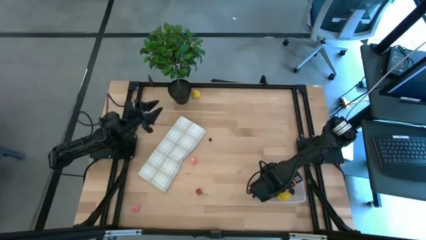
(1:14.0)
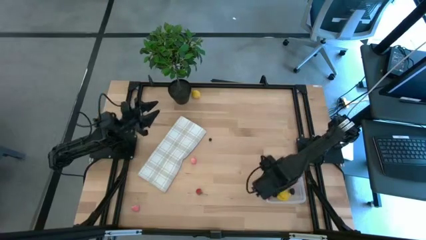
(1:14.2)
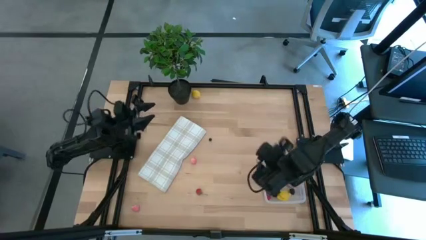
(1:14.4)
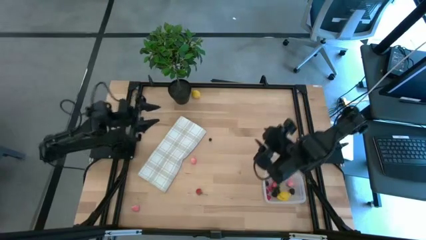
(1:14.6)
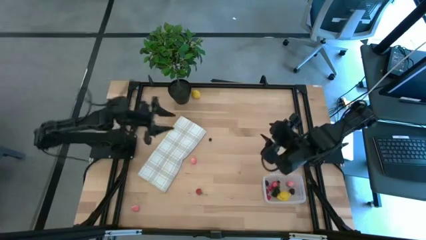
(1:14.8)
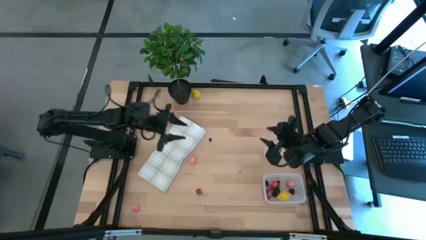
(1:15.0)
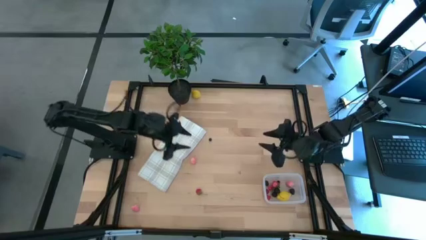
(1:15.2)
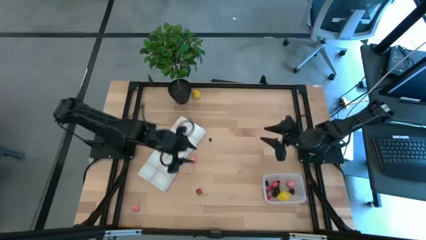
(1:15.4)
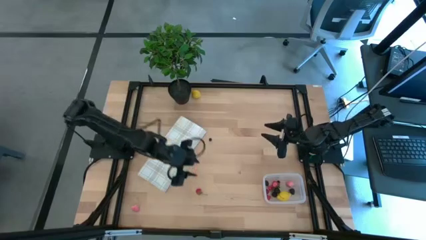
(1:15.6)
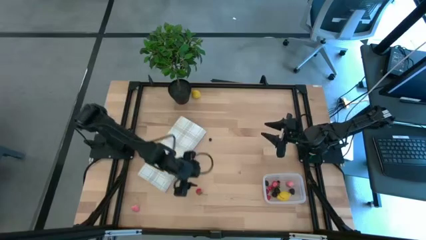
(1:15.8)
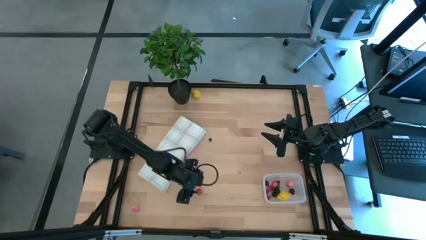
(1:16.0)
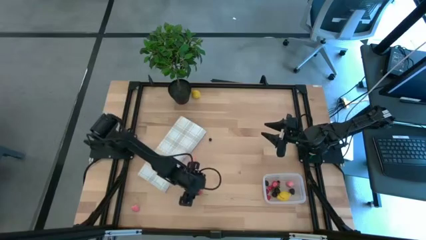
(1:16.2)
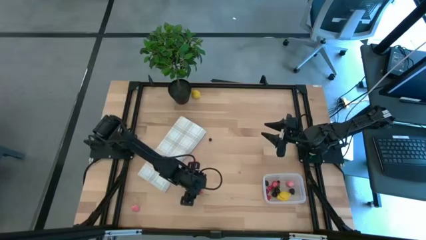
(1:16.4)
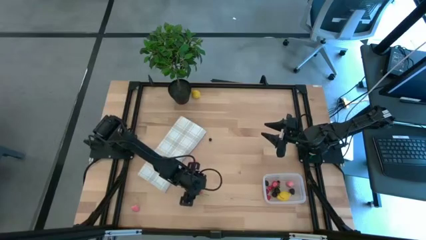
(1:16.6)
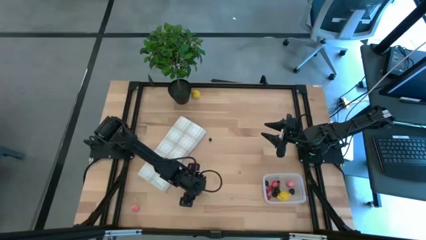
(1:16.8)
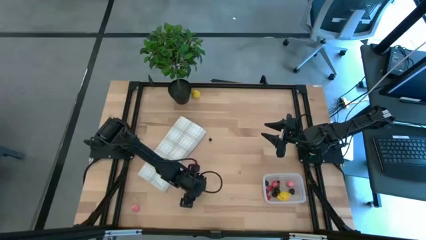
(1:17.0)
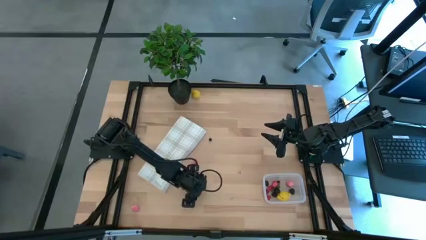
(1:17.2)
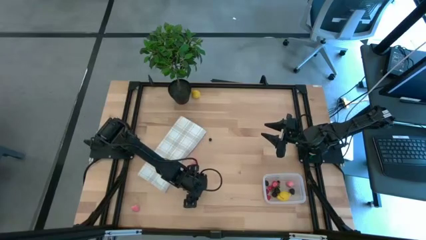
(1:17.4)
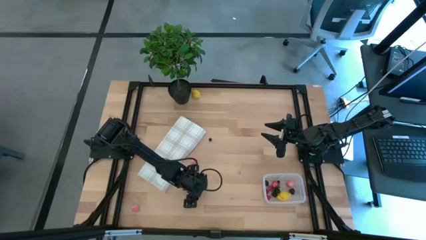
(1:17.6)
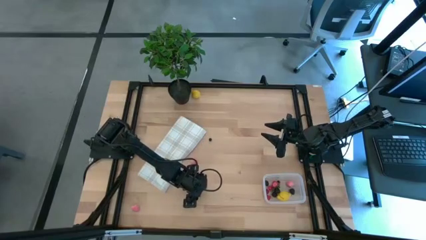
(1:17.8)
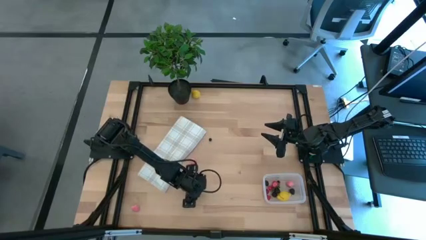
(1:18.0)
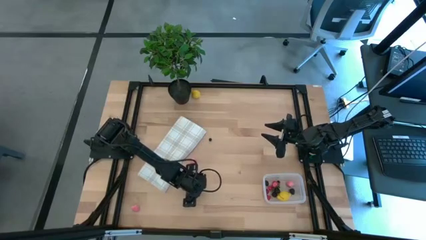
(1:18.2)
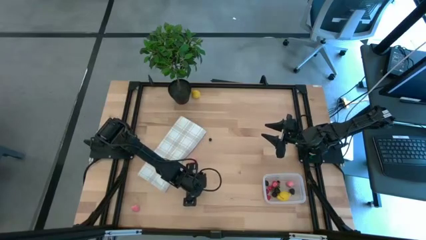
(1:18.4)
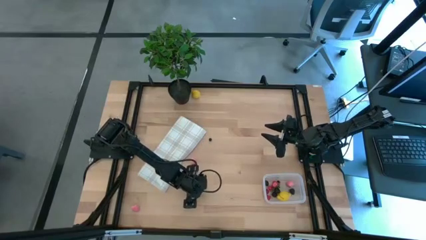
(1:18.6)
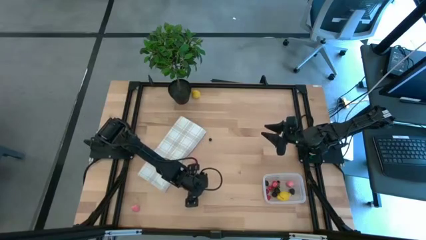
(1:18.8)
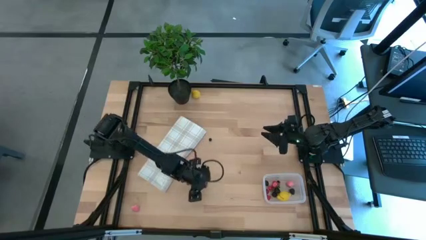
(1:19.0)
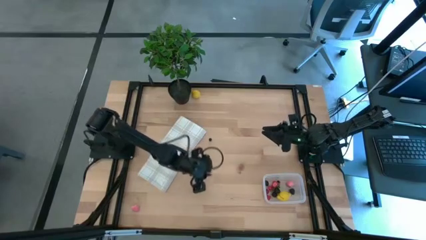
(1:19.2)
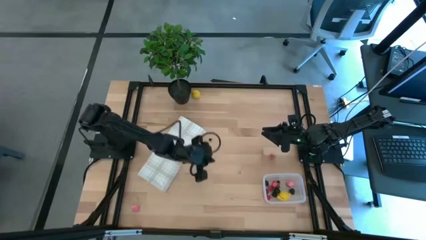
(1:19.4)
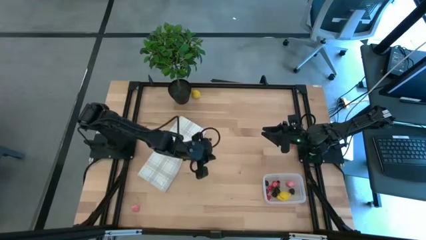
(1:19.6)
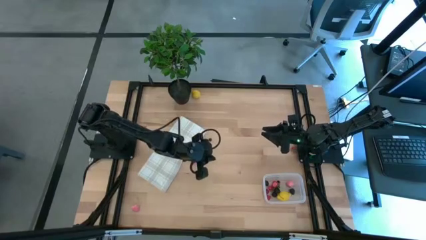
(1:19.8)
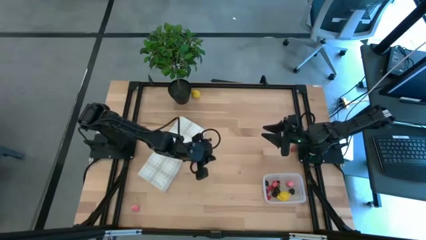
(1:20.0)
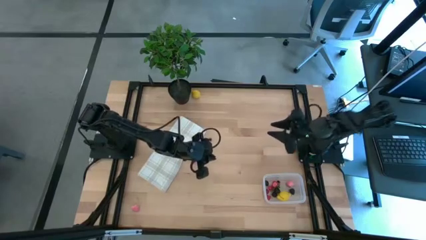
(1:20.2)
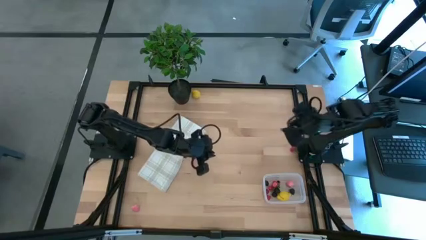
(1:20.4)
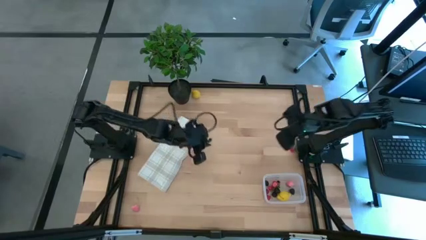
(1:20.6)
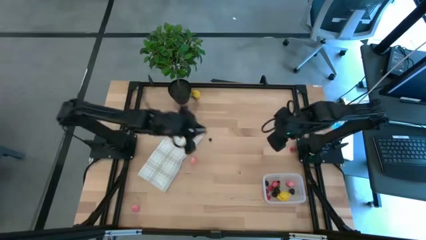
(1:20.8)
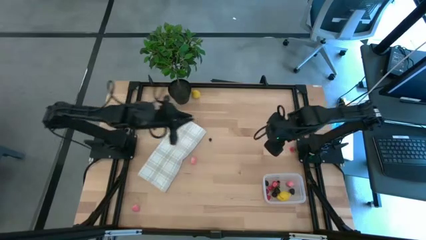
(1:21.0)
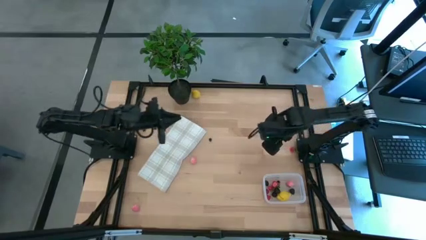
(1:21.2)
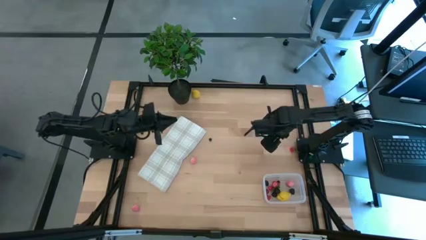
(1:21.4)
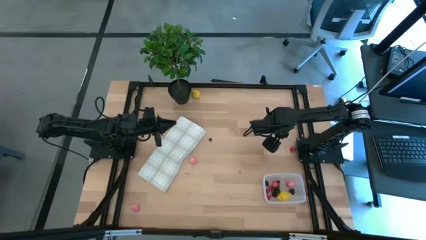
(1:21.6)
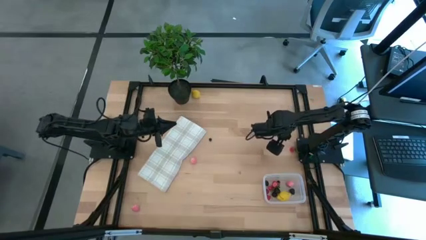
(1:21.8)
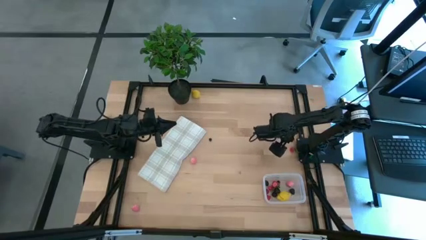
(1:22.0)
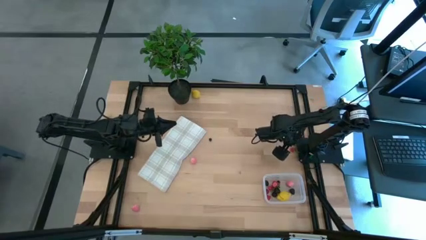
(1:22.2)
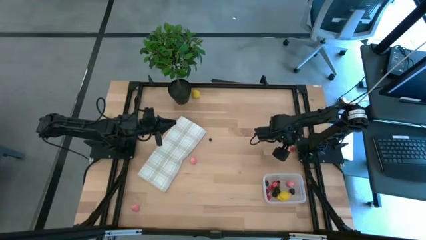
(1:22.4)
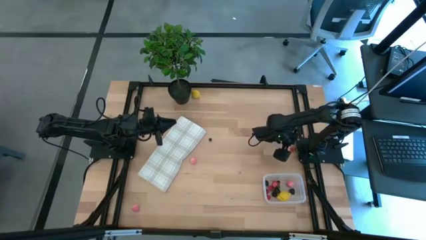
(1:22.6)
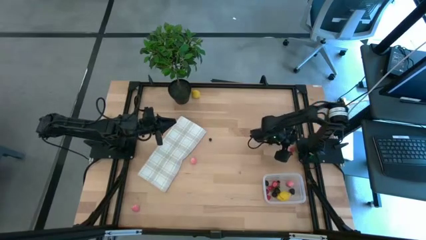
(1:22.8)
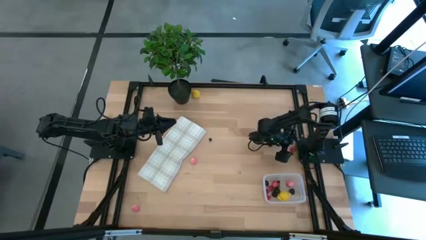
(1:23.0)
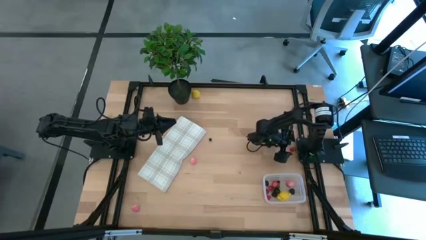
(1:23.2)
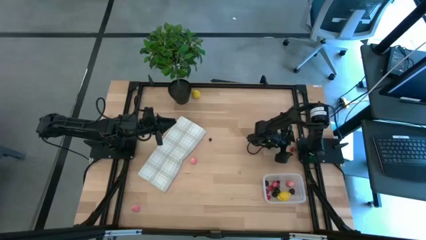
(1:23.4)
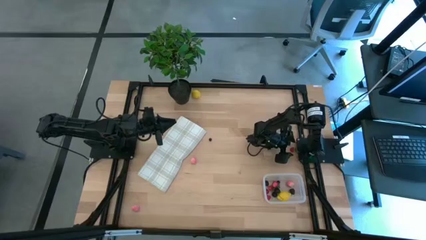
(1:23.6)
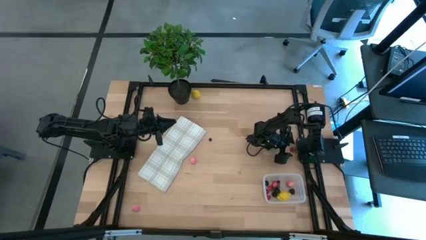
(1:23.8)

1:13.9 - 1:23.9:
Task: Pick and placing Produce into tupperware
Put the red strawberry into the transparent bin

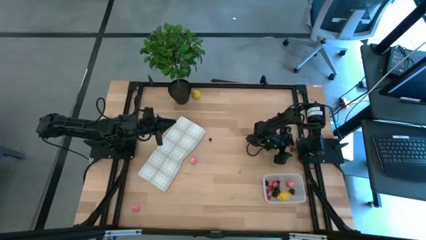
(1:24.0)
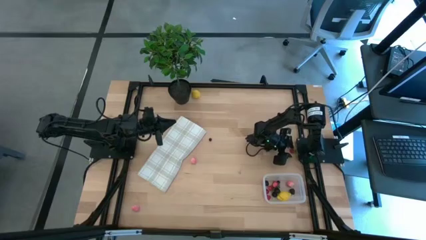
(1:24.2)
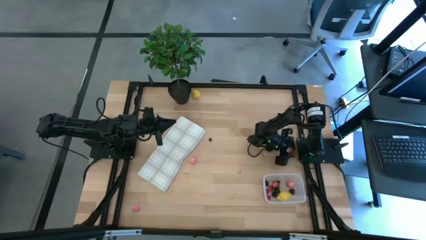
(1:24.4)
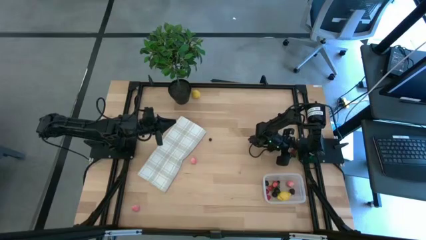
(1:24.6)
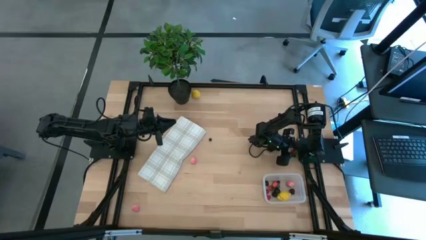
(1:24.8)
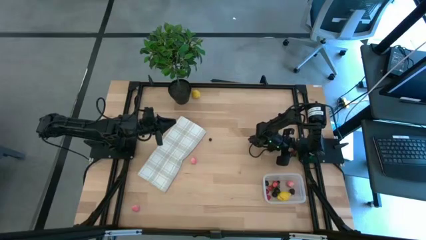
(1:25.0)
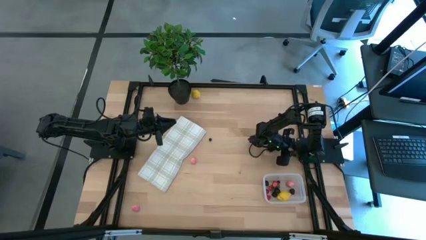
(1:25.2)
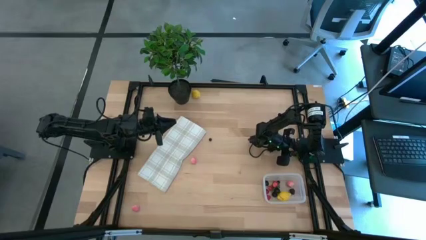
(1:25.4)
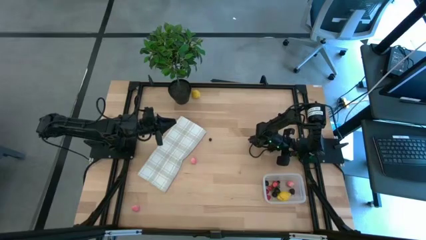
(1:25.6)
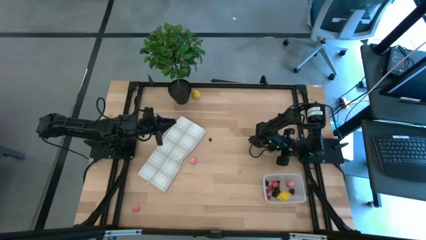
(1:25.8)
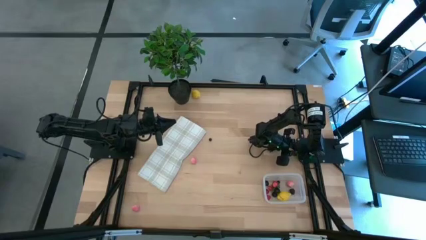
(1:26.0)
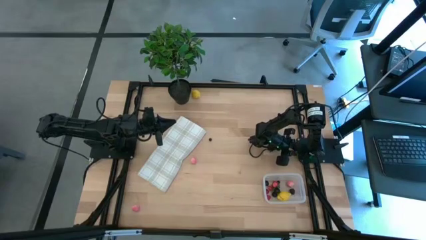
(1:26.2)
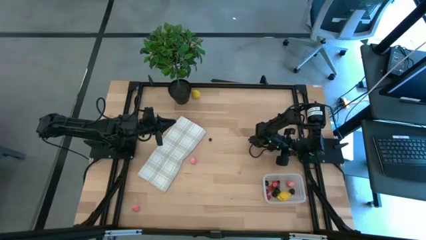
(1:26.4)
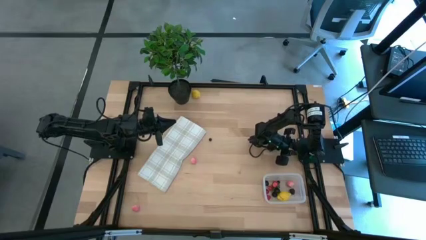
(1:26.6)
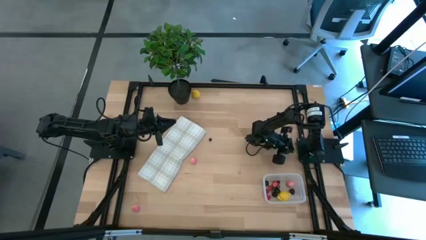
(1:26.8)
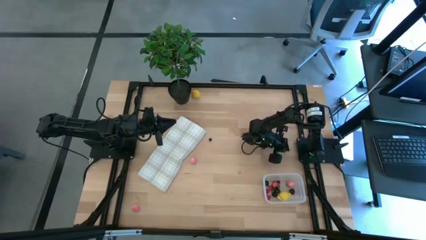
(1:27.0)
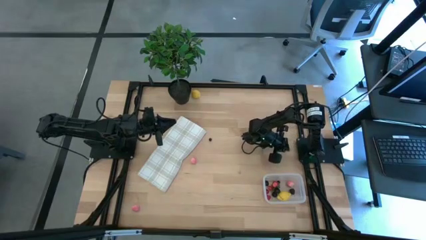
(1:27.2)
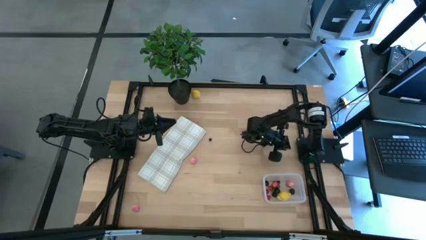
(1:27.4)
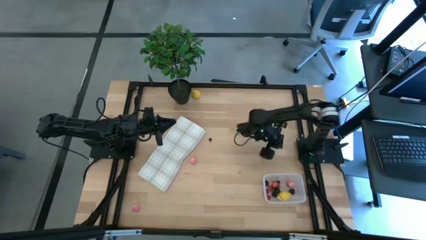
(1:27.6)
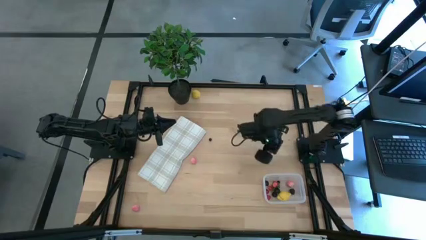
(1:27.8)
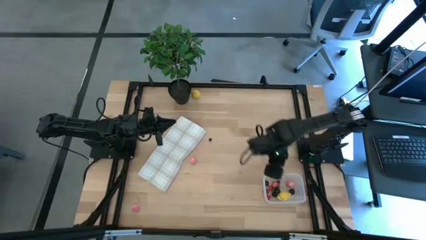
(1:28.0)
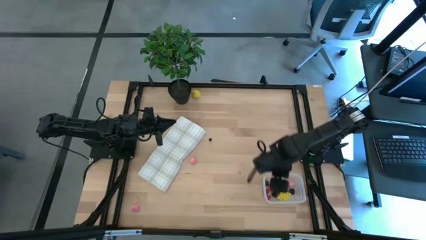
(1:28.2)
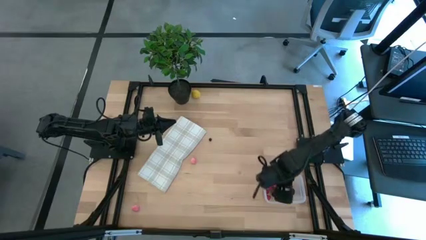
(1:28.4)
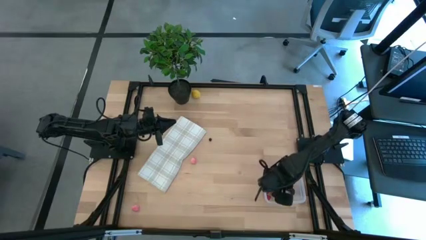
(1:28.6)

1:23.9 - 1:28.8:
Put the red strawberry into the transparent bin
